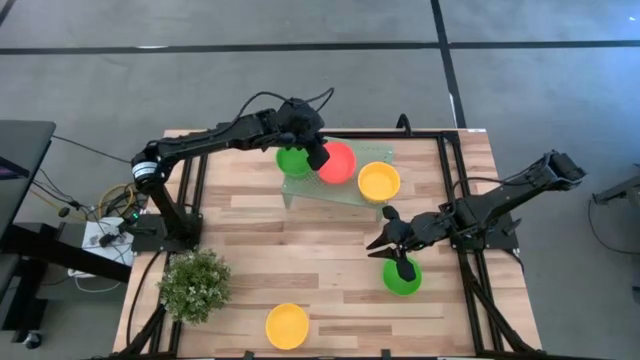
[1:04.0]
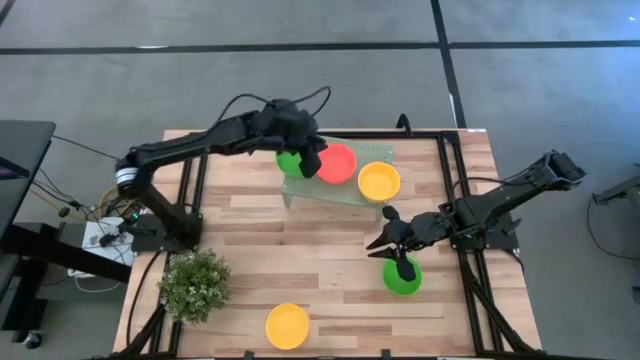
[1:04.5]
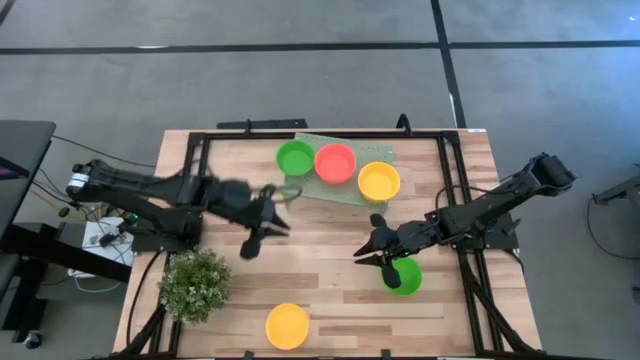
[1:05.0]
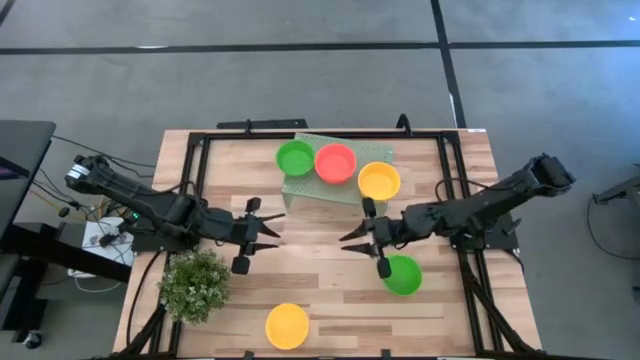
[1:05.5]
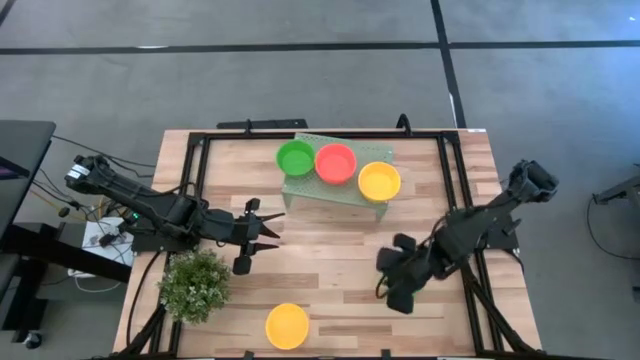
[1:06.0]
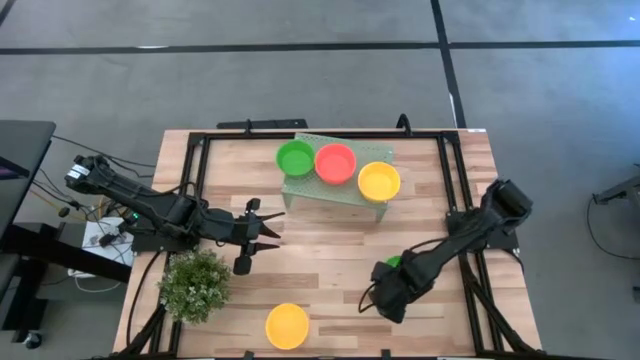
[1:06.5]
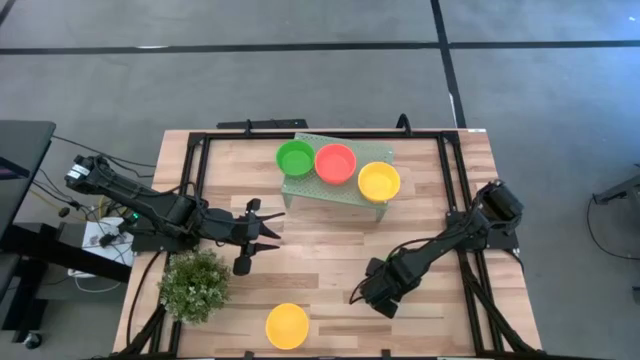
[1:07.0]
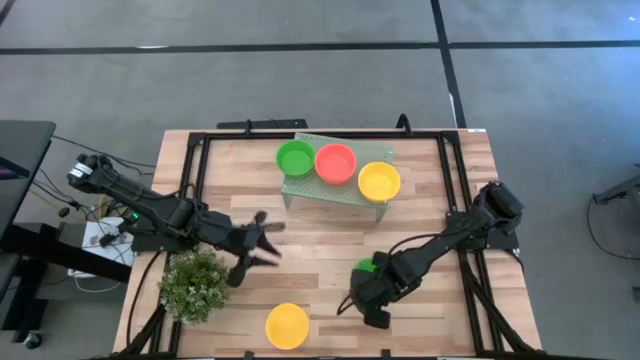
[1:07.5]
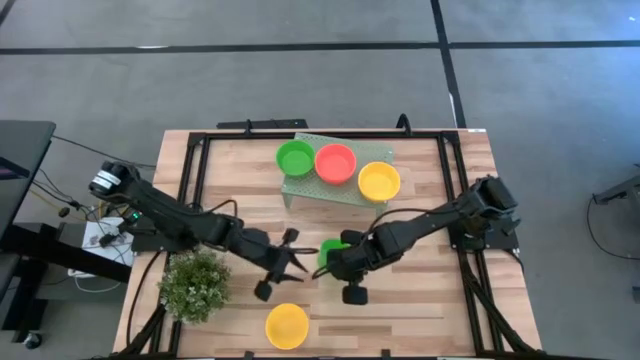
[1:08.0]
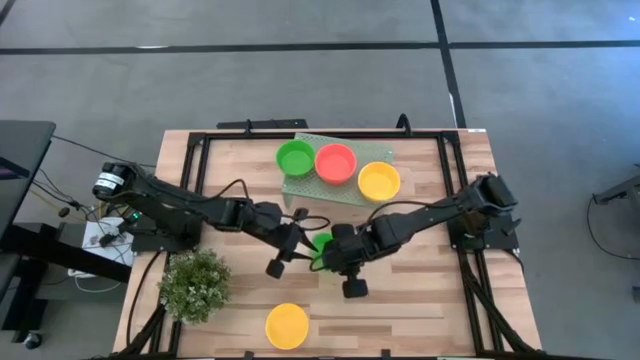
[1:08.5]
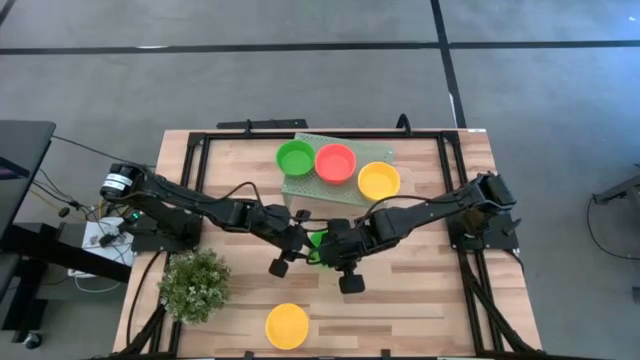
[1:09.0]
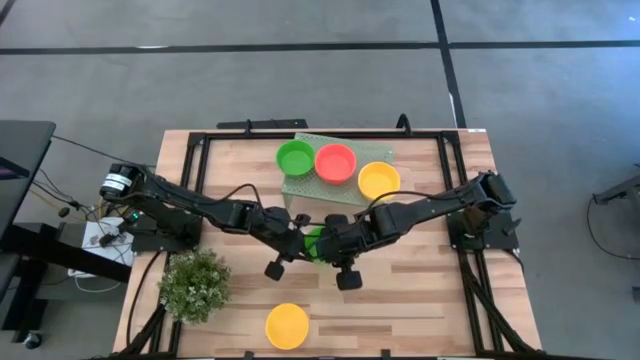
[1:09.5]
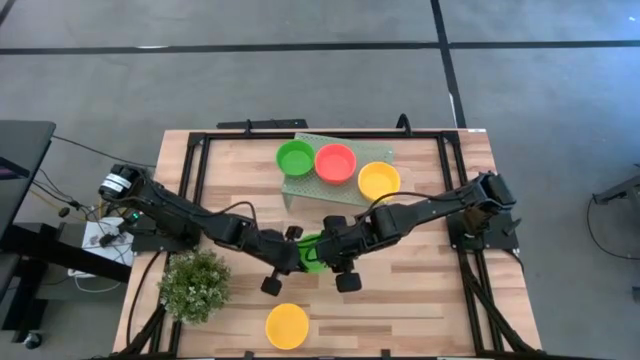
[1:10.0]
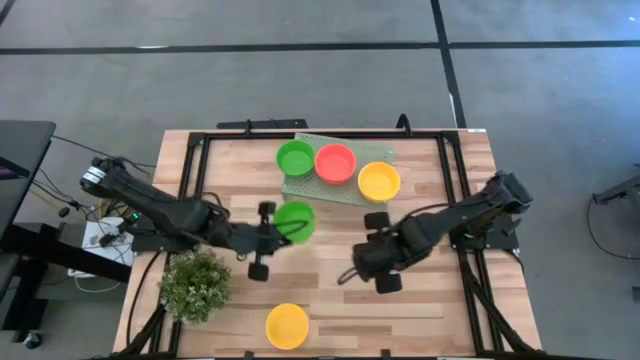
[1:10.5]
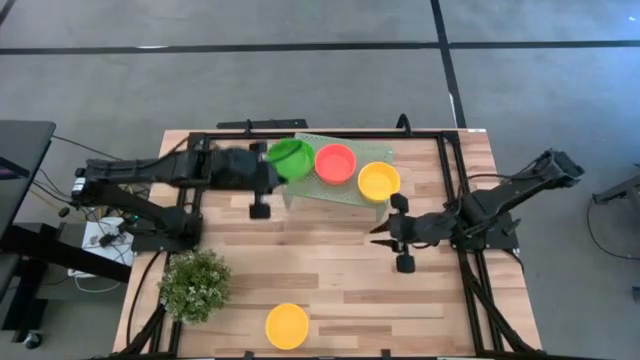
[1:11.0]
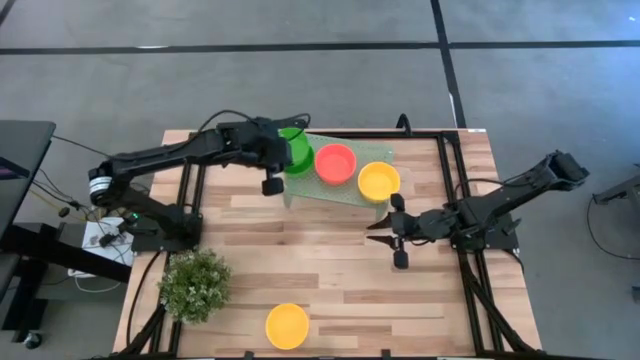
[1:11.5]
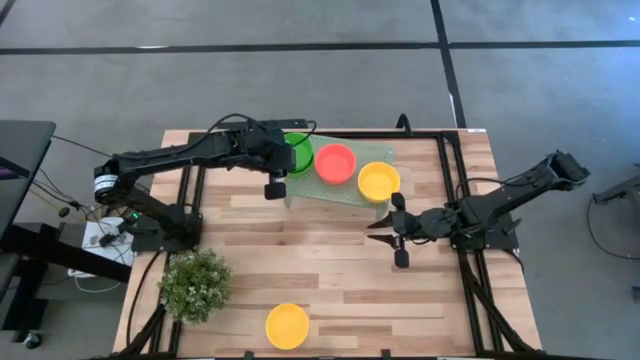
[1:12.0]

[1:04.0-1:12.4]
Task: Pick & Place Mini bowls
Stack the green bowl on top of the green bowls on the shelf

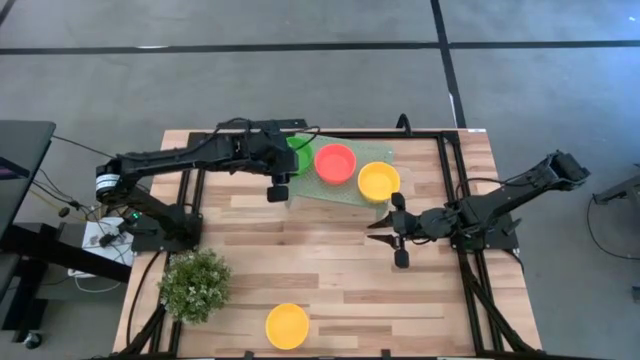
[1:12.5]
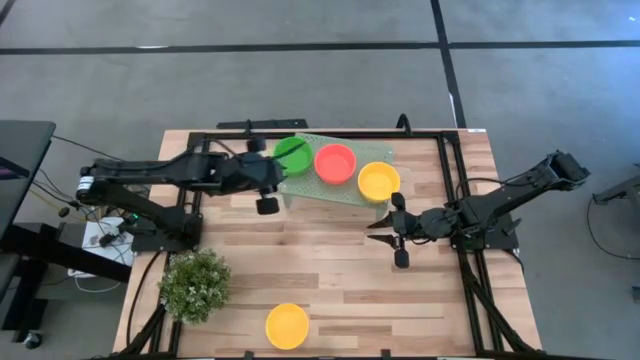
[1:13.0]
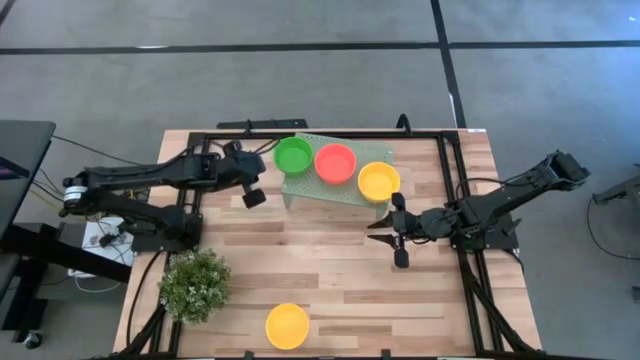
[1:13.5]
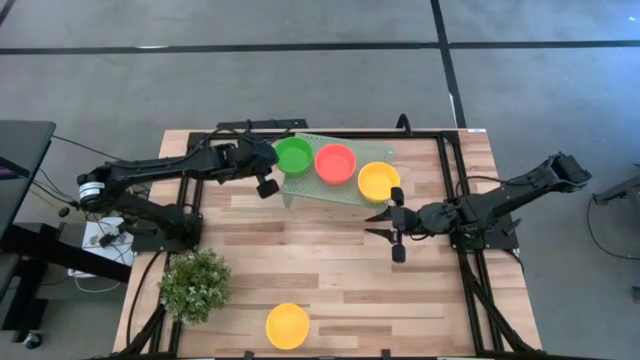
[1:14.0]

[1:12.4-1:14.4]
Adjust the stacked green bowls on the shelf

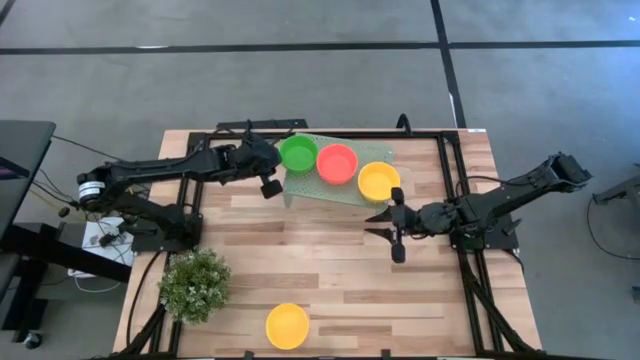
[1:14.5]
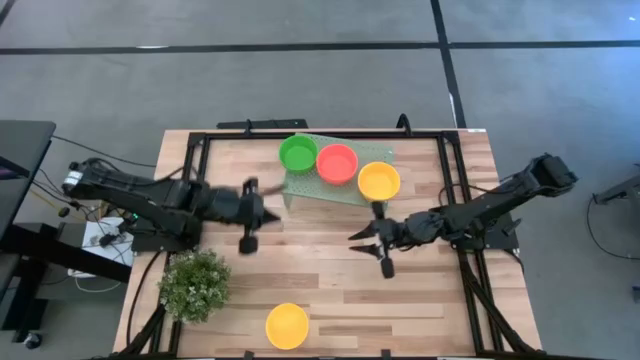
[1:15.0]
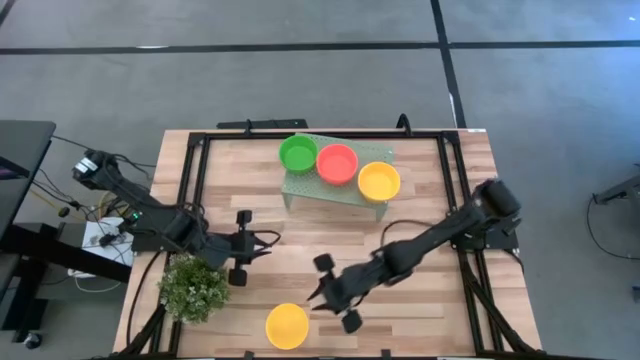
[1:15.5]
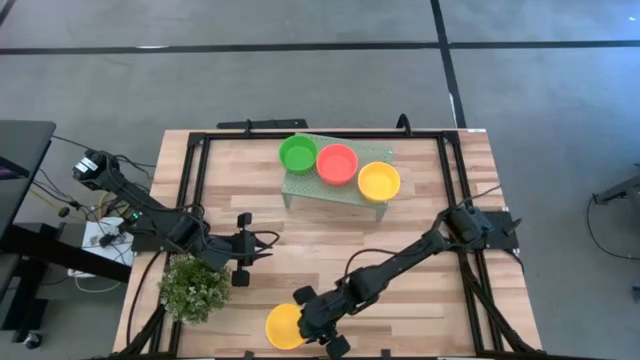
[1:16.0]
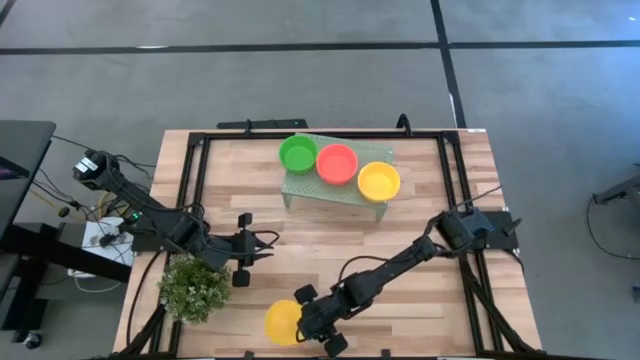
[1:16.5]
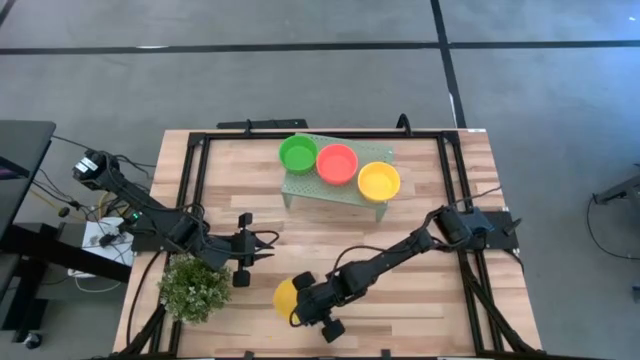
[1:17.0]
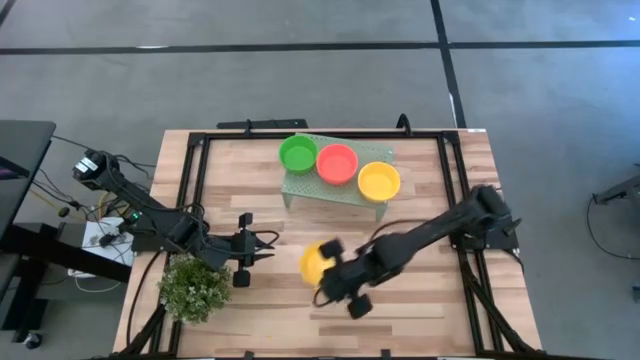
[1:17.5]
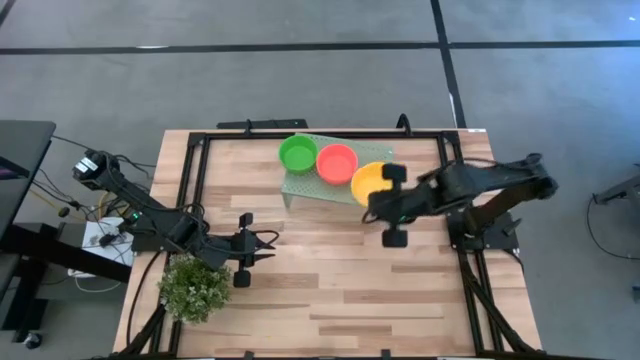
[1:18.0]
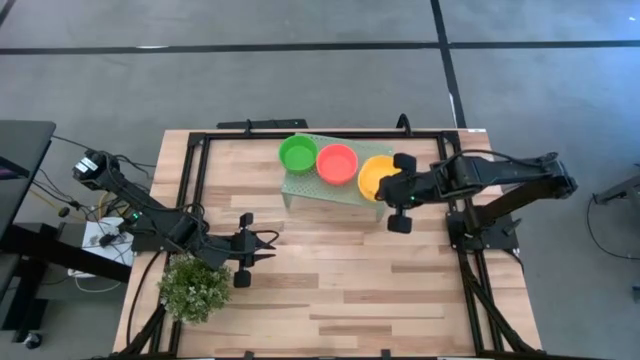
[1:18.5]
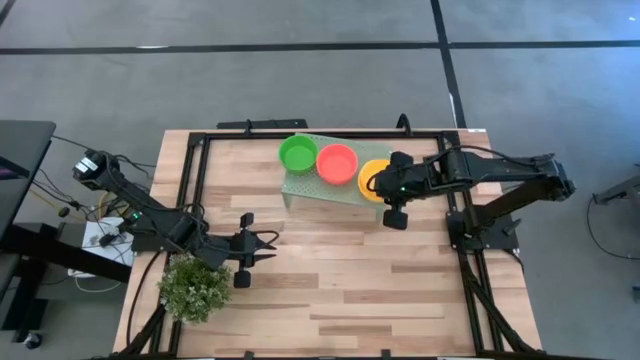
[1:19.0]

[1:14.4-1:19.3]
Stack the yellow bowl on top of the yellow bowls on the shelf

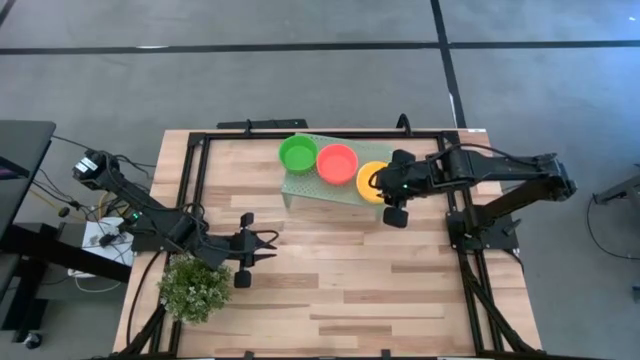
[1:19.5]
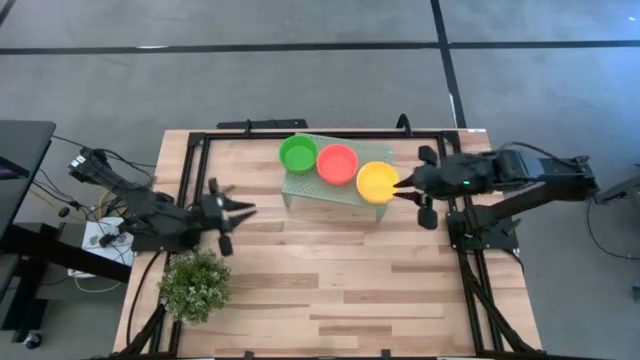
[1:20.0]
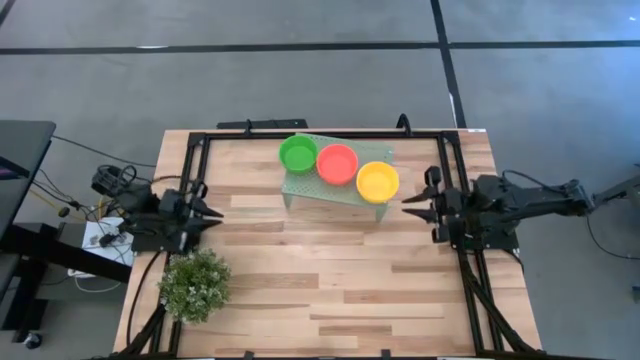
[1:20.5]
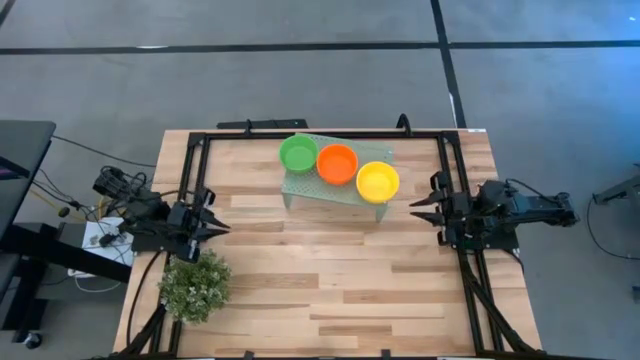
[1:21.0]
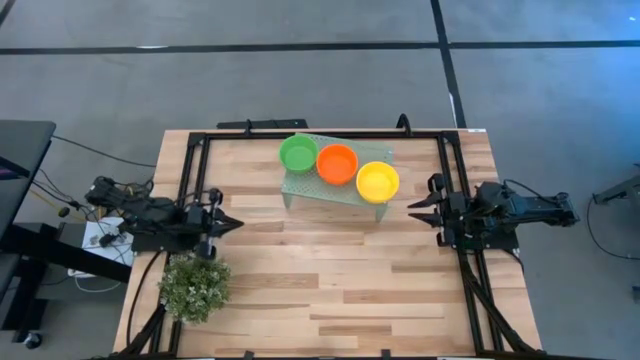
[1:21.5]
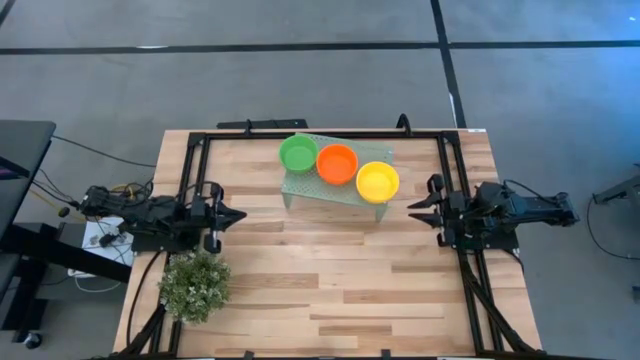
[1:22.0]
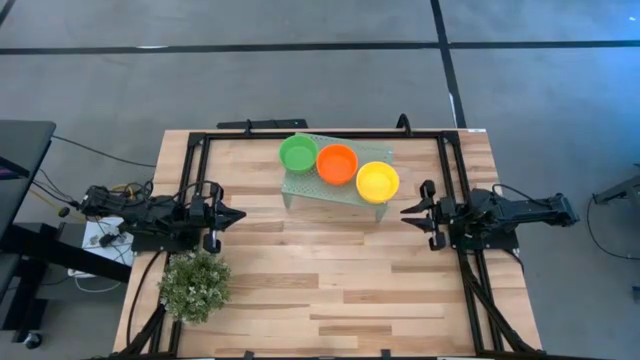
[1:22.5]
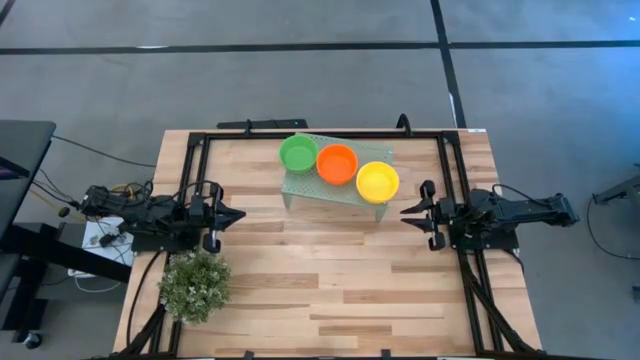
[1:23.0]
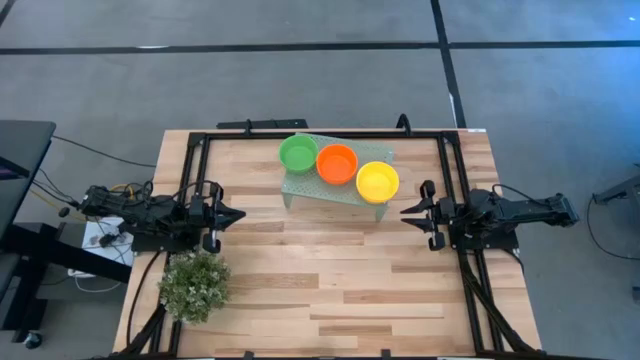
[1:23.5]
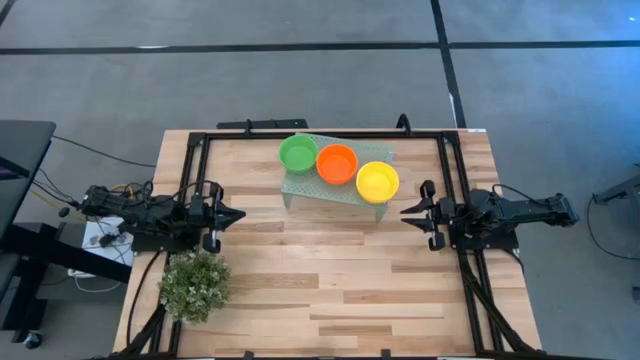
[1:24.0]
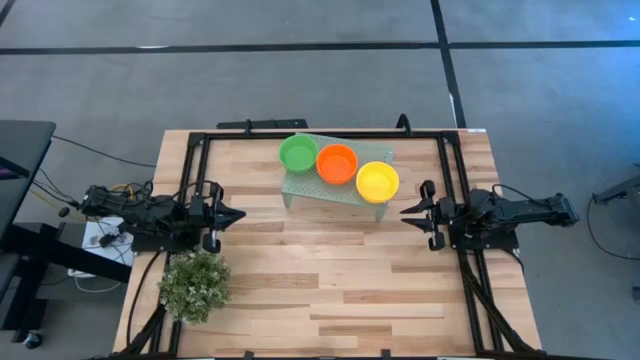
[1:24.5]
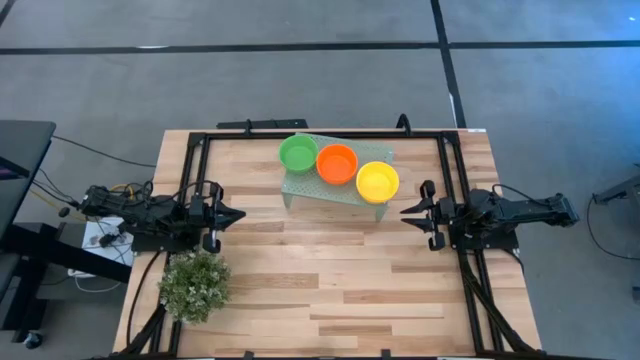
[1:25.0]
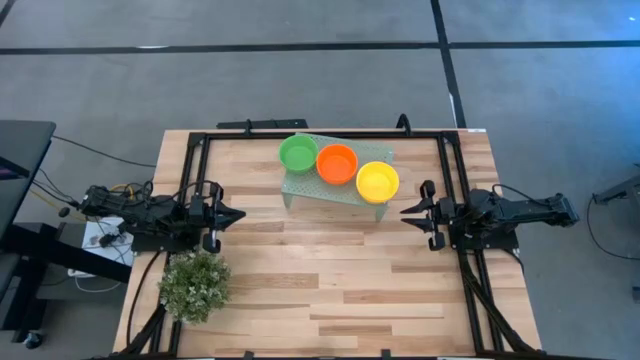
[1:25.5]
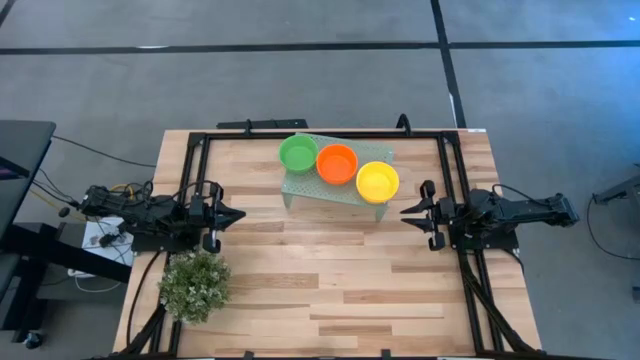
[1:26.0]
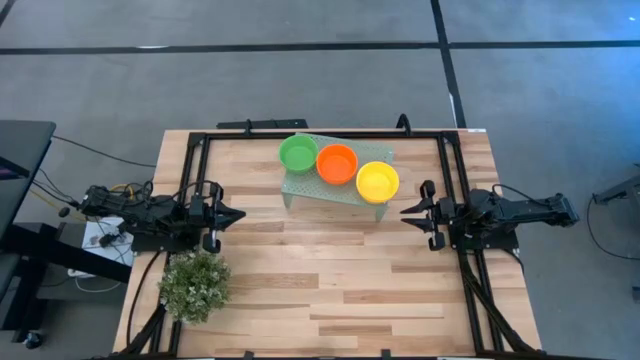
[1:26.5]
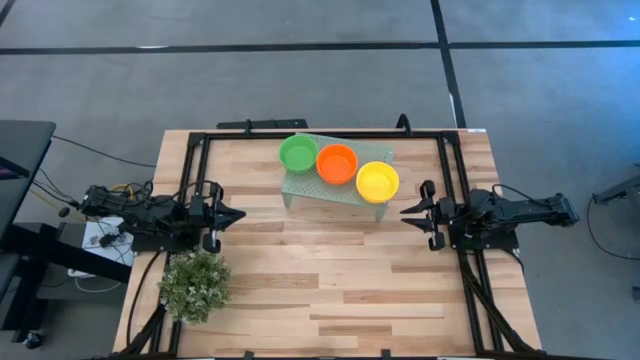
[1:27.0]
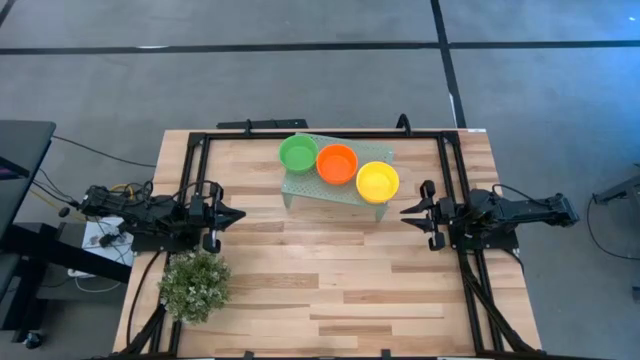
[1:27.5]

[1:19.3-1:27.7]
Return to Home Position
